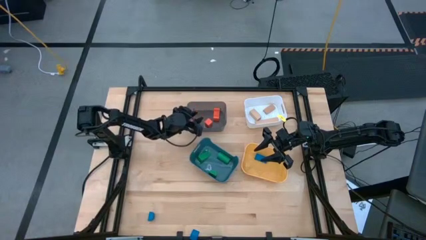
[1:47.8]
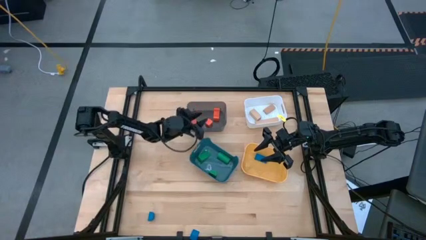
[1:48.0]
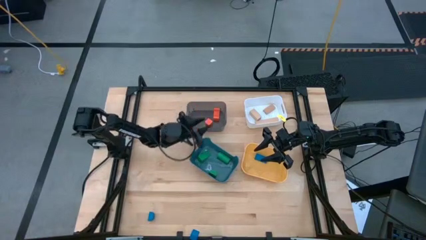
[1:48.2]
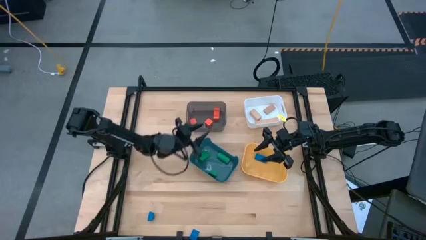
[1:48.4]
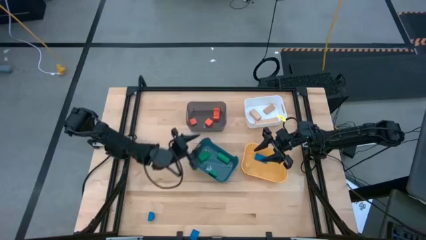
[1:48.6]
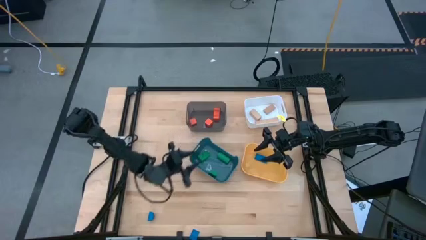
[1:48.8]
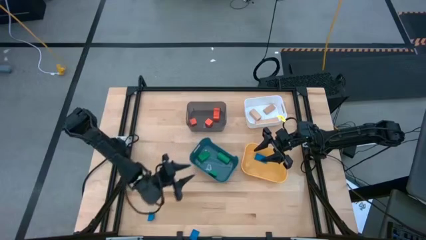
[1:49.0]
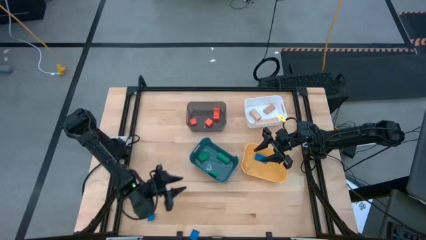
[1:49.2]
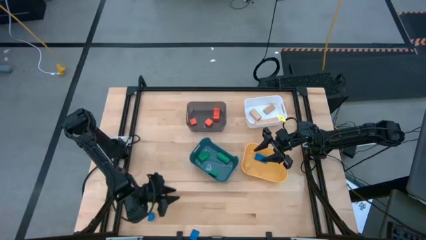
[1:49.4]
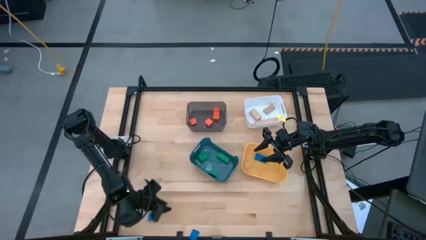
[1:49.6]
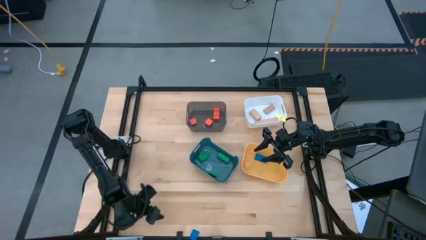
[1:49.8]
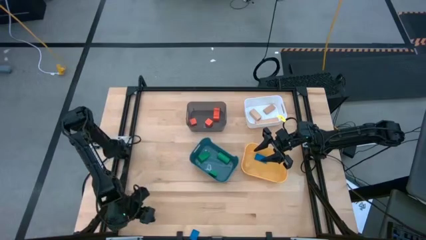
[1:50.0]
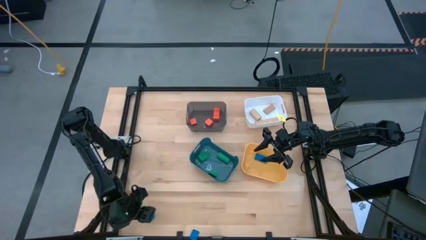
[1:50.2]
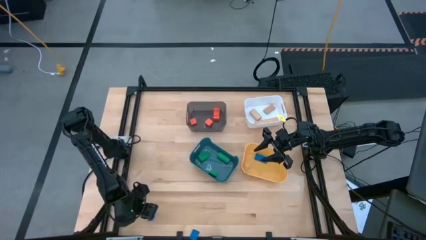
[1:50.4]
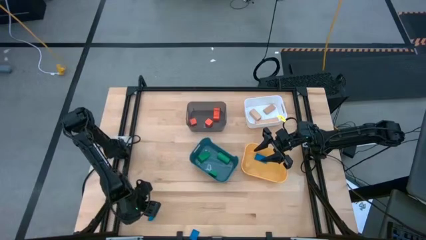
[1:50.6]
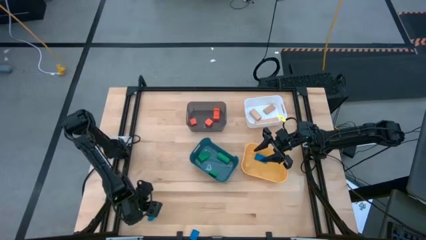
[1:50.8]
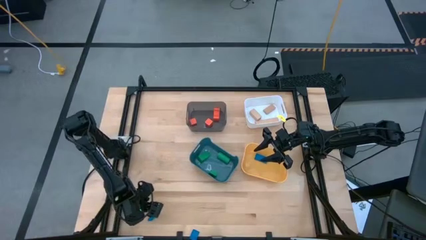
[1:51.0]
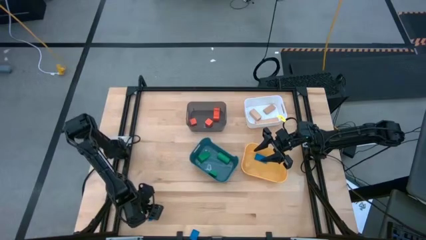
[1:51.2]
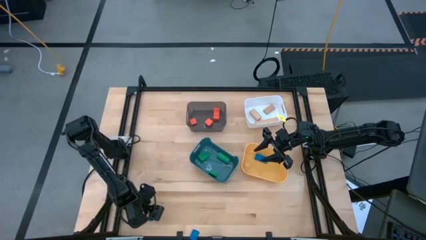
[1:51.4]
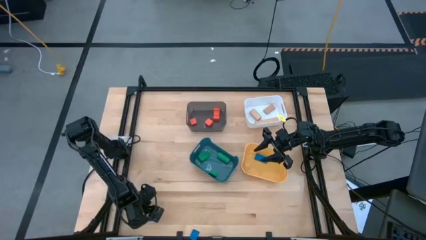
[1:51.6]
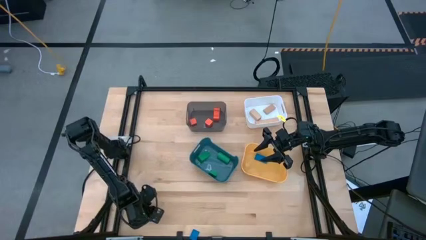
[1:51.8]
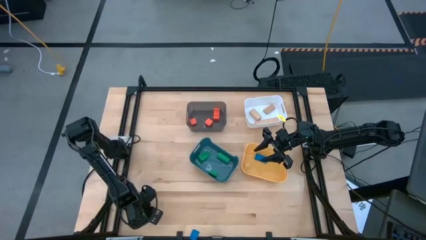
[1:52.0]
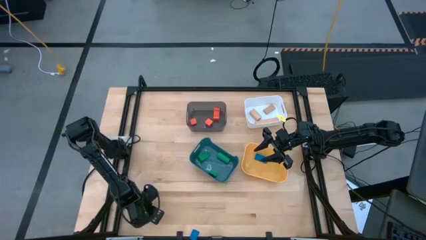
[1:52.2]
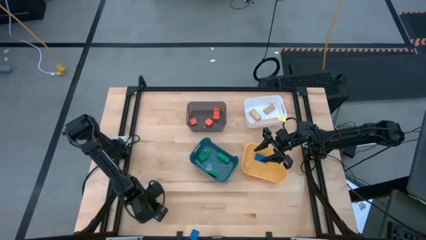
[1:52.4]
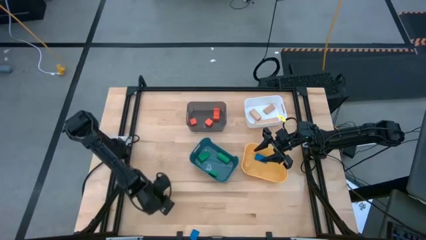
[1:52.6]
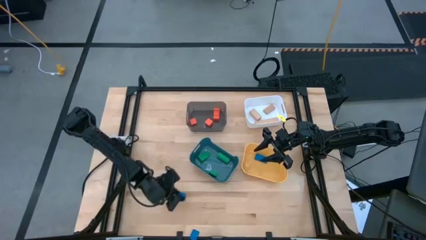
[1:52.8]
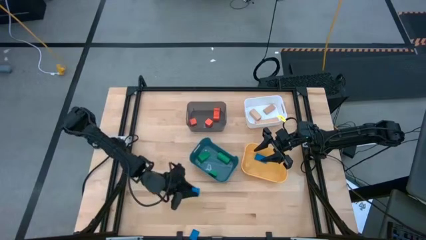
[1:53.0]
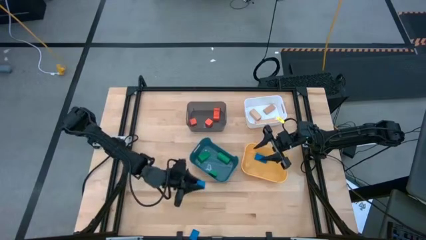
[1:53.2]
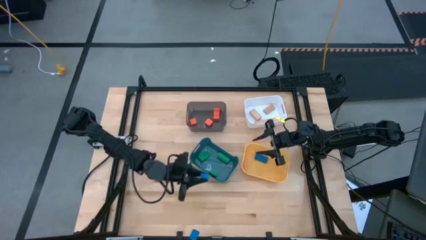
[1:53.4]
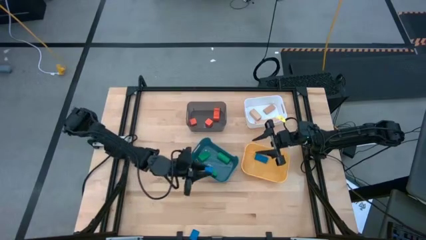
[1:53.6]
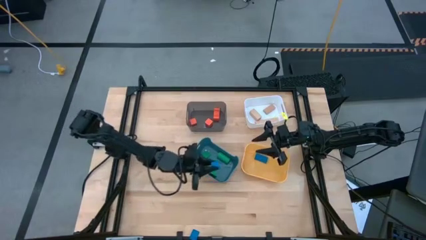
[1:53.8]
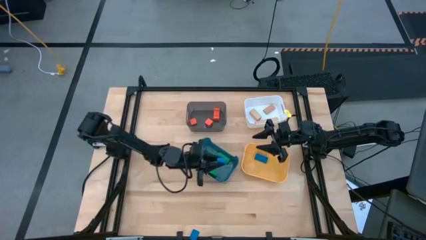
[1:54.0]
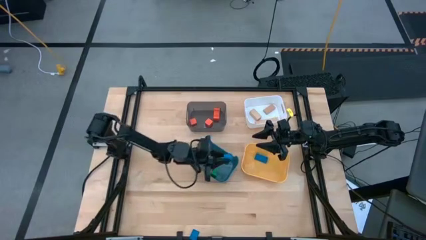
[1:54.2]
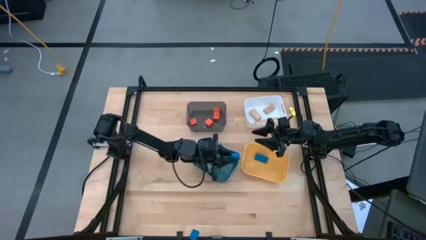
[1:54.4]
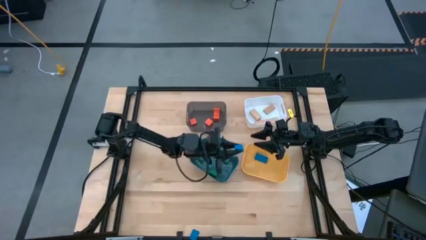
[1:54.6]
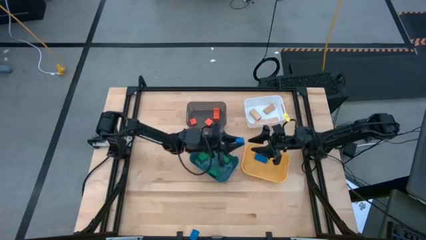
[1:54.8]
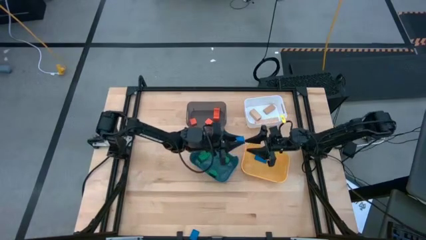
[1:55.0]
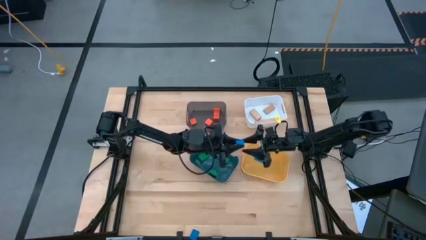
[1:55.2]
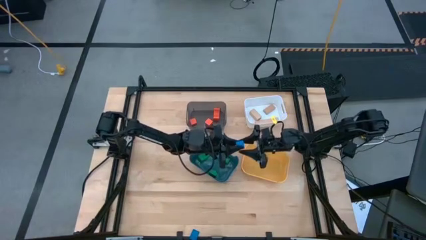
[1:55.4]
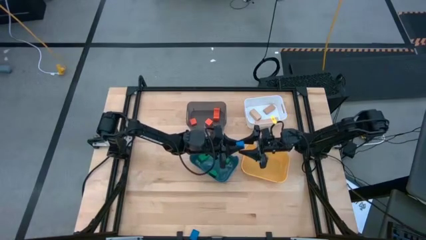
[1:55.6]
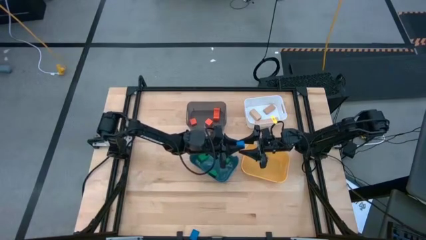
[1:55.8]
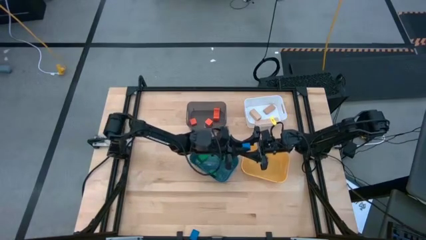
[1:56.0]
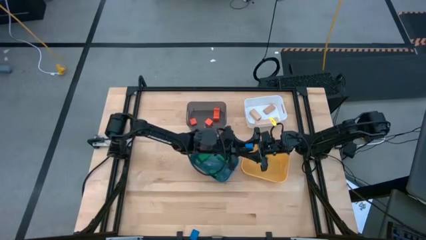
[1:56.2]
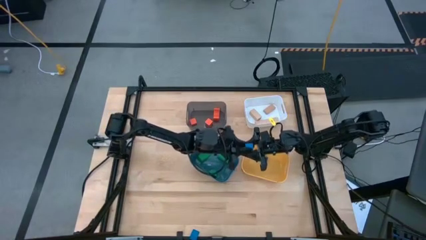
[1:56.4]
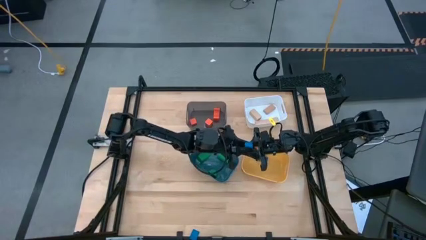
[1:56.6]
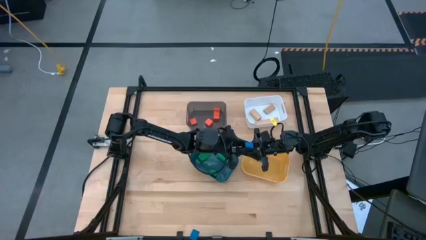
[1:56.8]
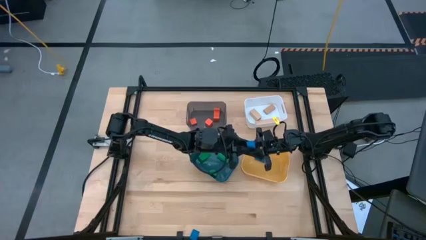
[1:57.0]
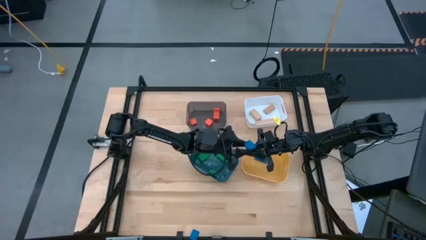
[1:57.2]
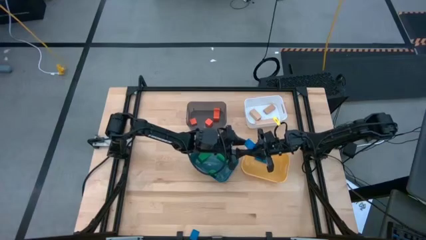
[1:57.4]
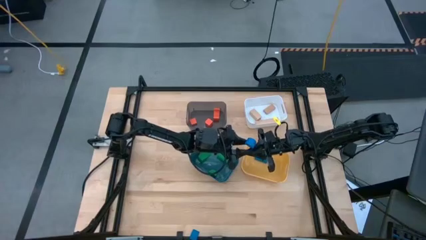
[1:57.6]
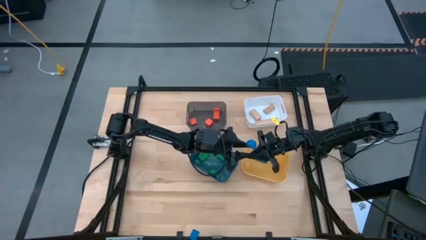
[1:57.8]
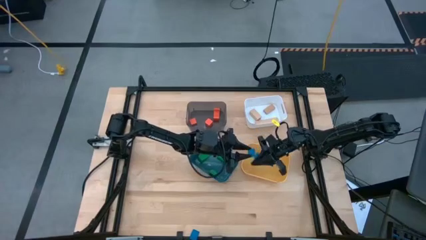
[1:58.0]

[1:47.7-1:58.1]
Task: Sort & place blocks by color
Put the left blue block into the yellow bin

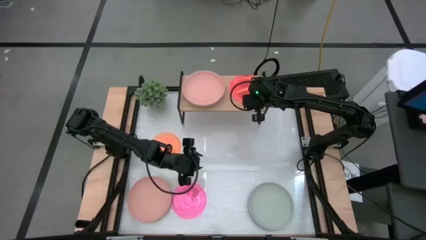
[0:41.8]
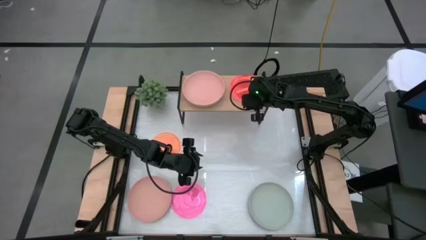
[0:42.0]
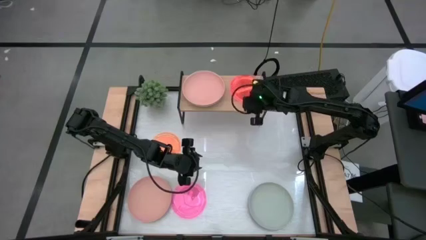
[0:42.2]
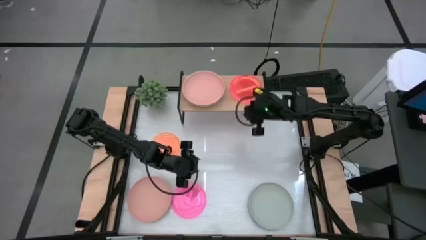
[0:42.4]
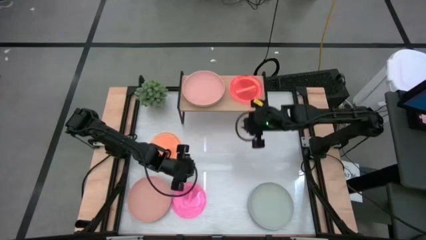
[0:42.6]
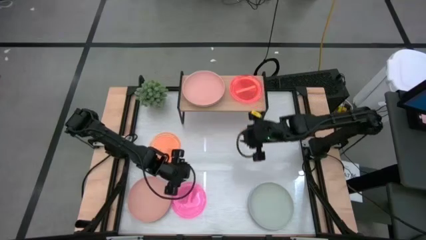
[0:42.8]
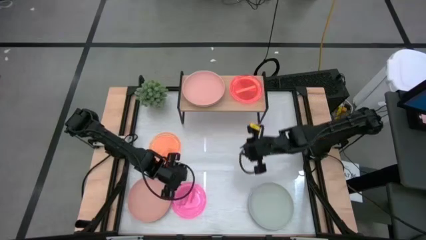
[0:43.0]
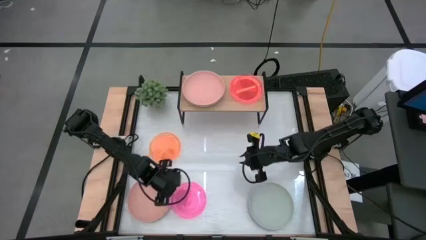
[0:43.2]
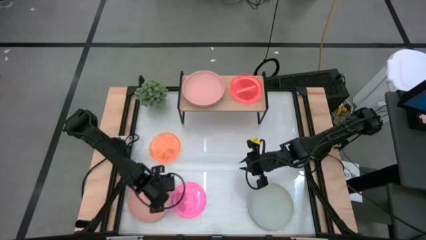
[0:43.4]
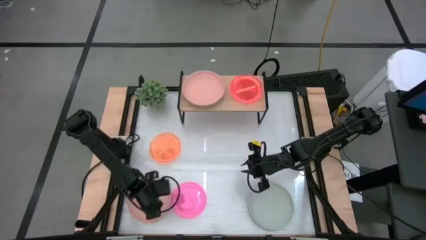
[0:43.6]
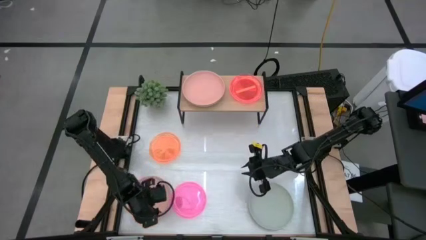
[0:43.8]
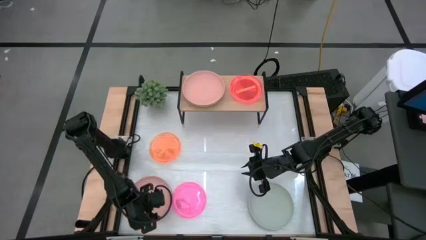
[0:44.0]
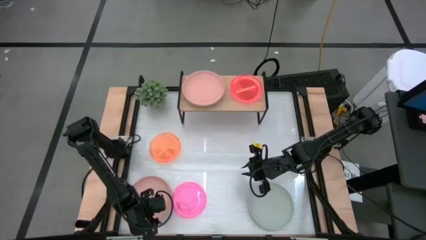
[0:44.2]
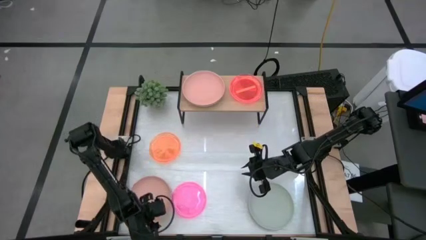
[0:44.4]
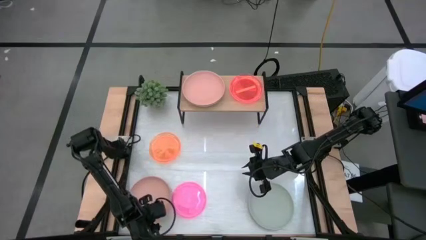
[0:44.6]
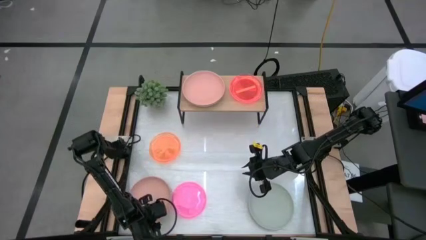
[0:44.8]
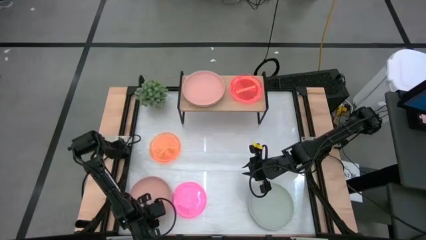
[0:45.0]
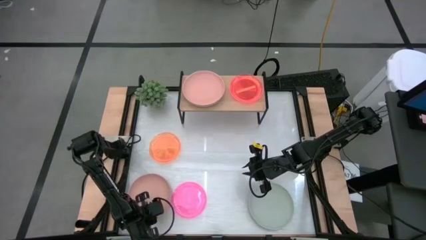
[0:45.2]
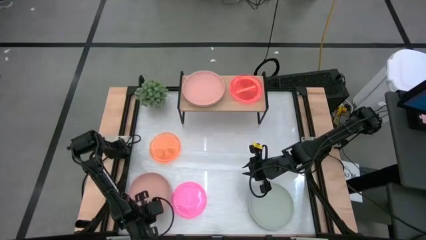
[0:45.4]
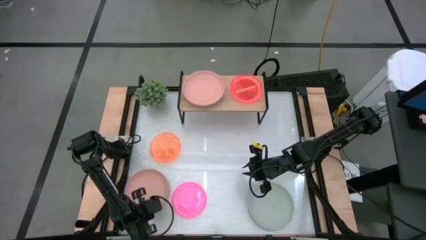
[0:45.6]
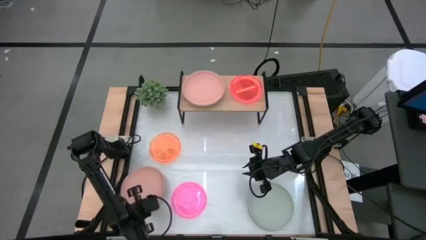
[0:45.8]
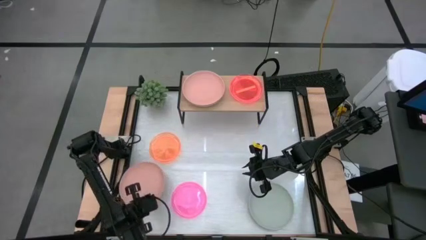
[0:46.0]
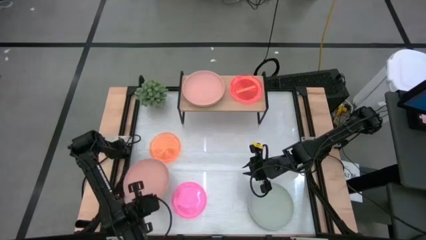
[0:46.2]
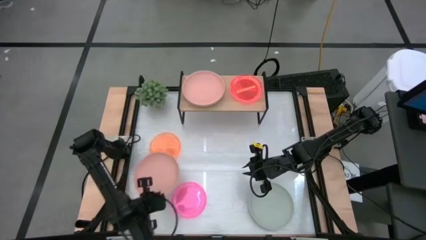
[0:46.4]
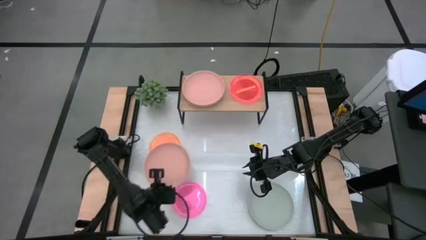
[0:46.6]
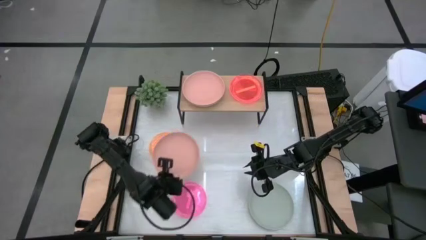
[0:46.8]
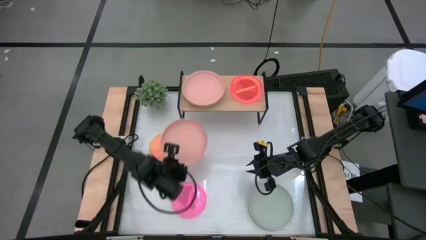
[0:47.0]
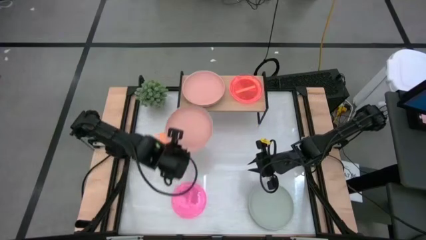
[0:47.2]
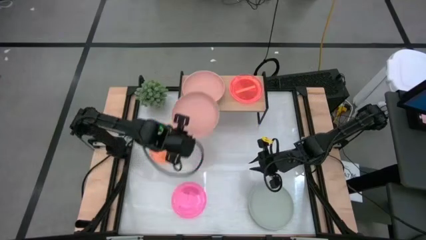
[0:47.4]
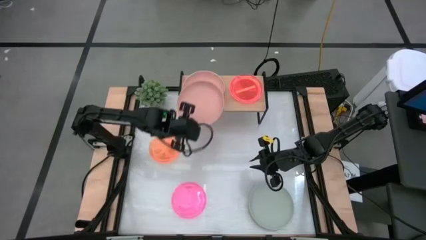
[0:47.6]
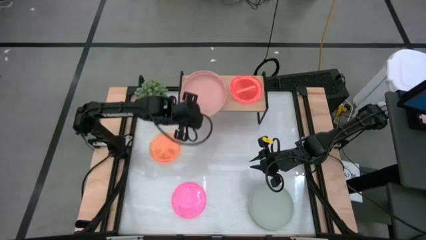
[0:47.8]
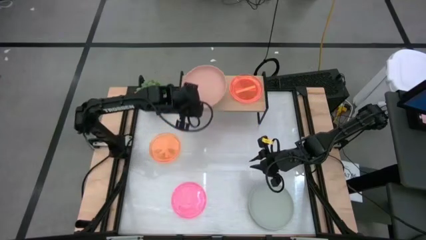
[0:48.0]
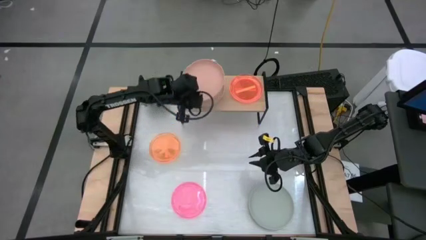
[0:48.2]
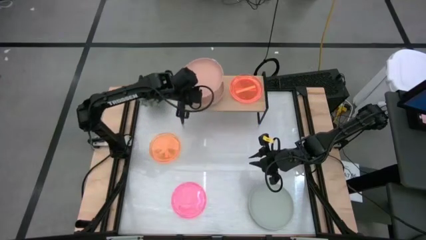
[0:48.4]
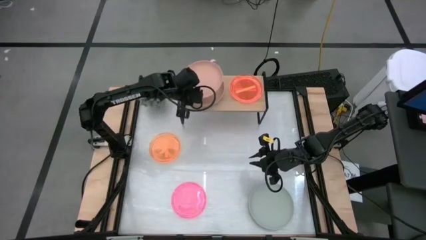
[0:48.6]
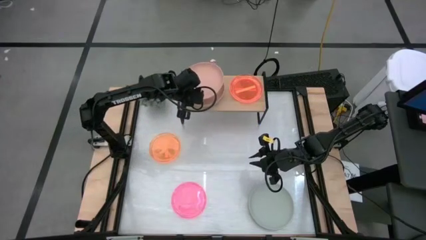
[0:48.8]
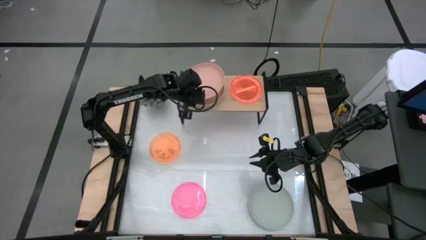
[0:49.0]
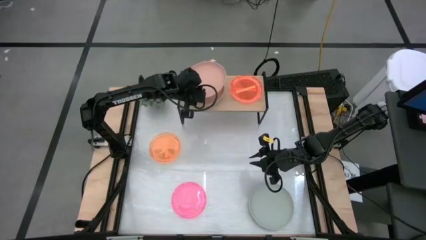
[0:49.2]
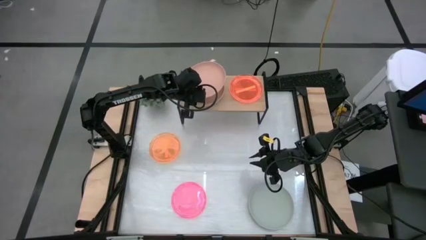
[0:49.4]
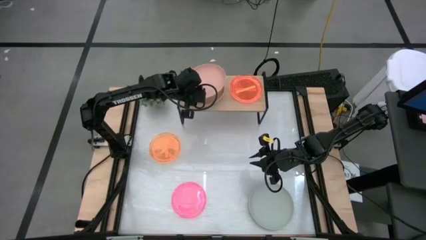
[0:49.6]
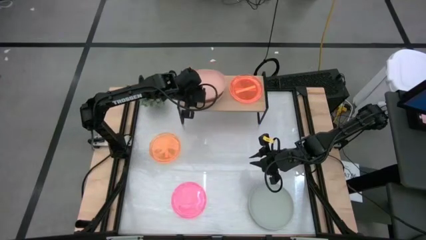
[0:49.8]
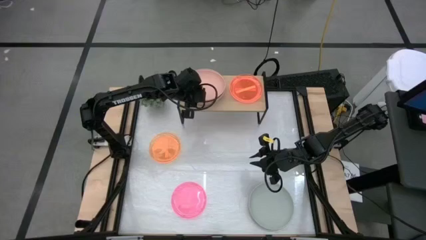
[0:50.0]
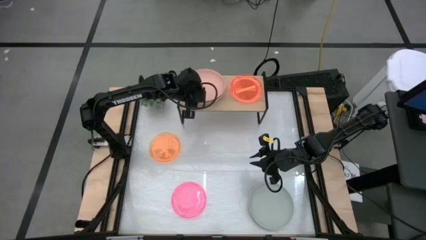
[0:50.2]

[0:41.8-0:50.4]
Task: Place and stack plates onto a shelf
Stack the light brown plate on top of the light brown plate
